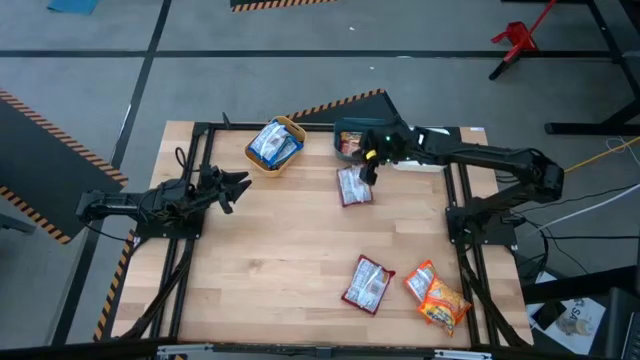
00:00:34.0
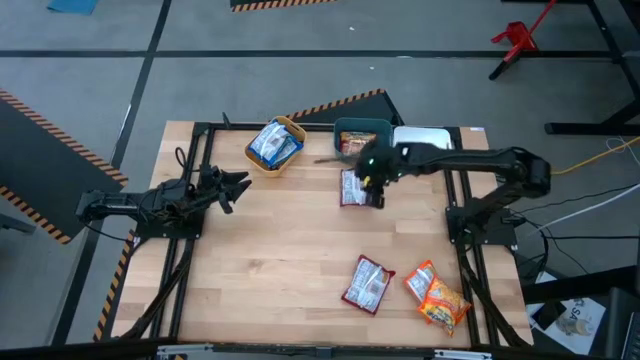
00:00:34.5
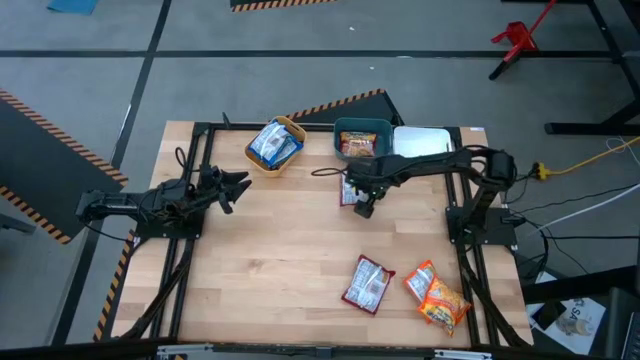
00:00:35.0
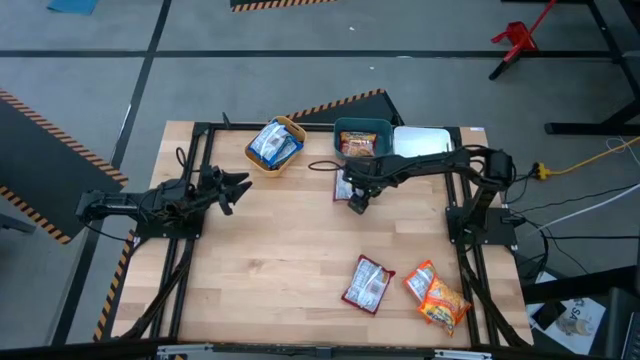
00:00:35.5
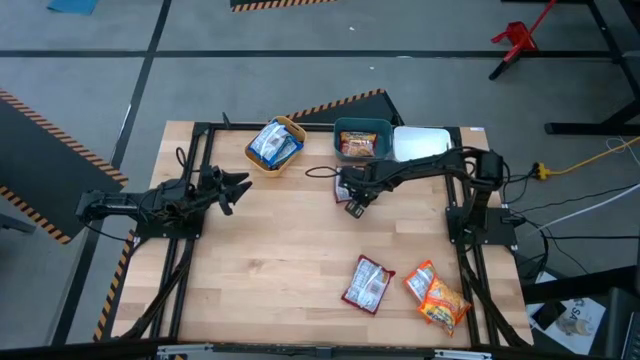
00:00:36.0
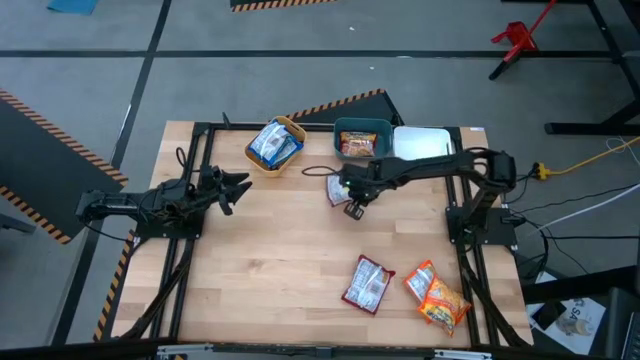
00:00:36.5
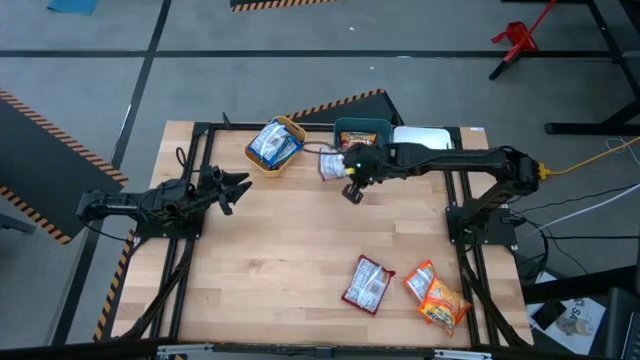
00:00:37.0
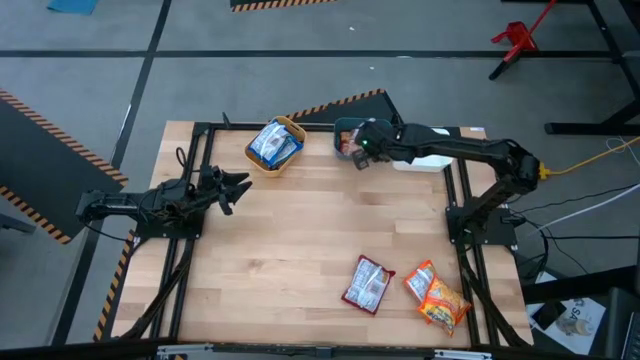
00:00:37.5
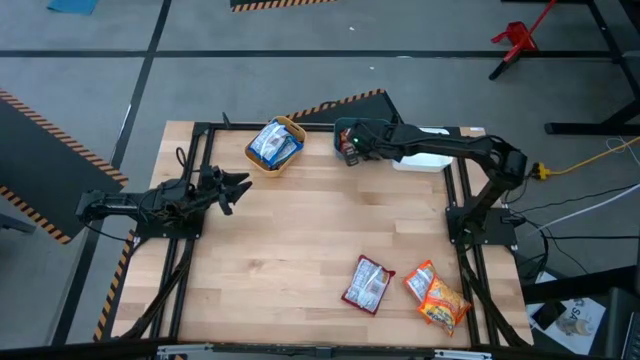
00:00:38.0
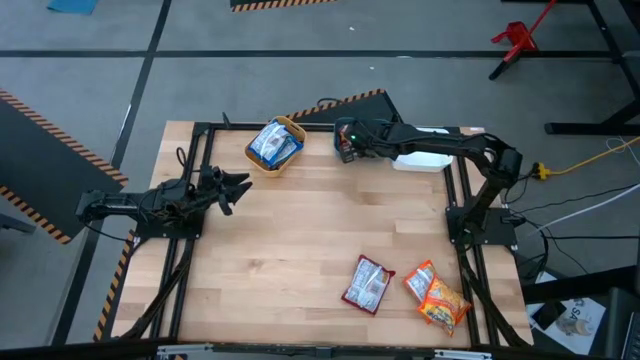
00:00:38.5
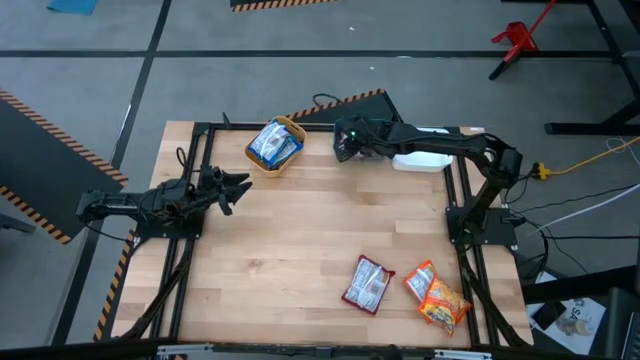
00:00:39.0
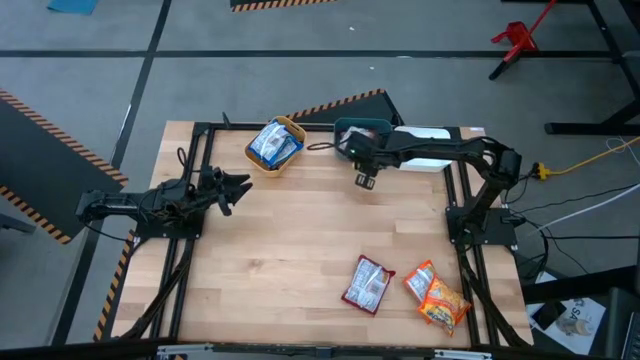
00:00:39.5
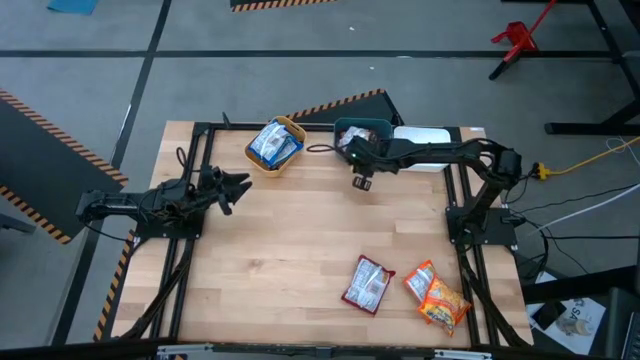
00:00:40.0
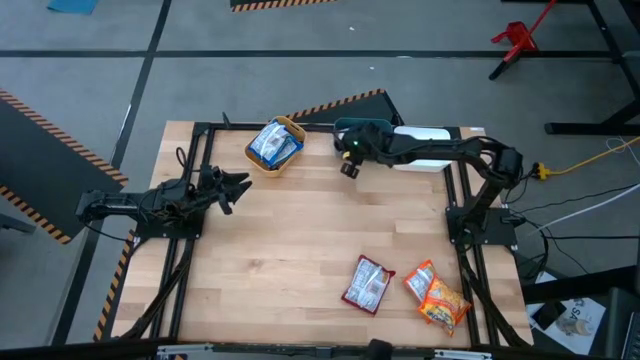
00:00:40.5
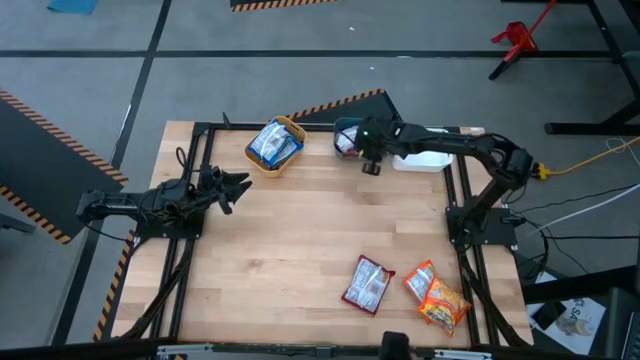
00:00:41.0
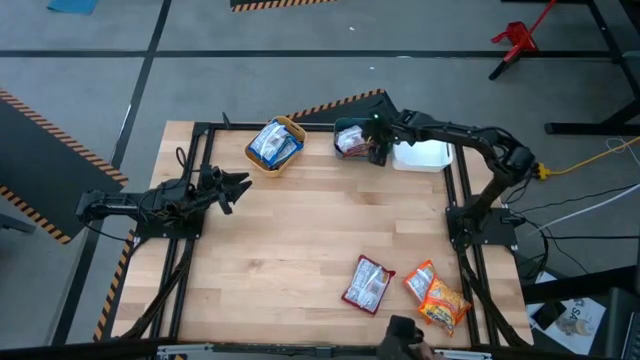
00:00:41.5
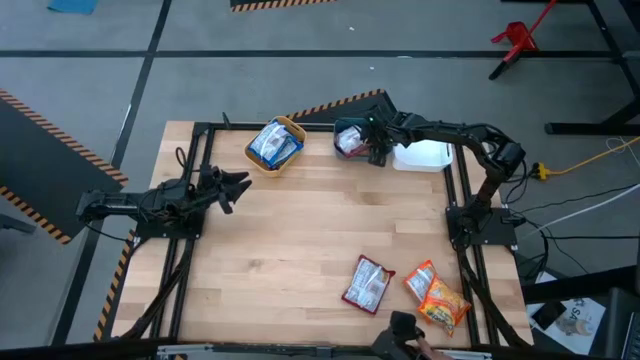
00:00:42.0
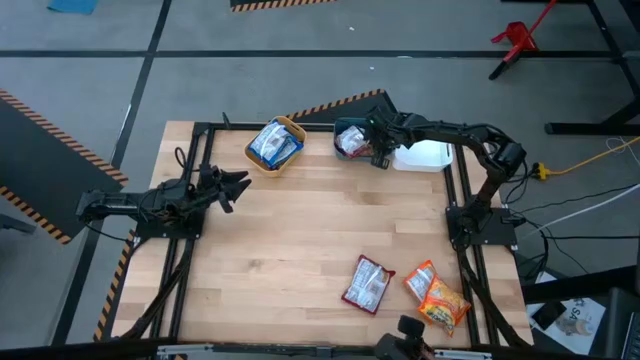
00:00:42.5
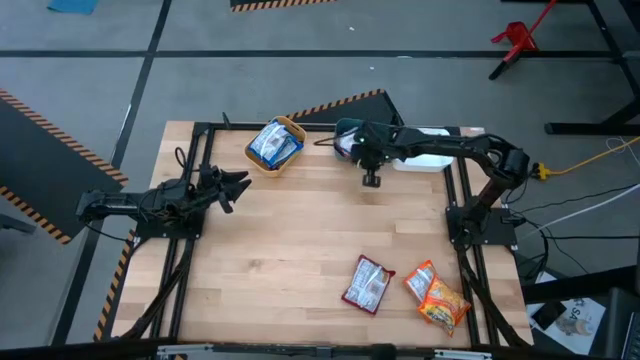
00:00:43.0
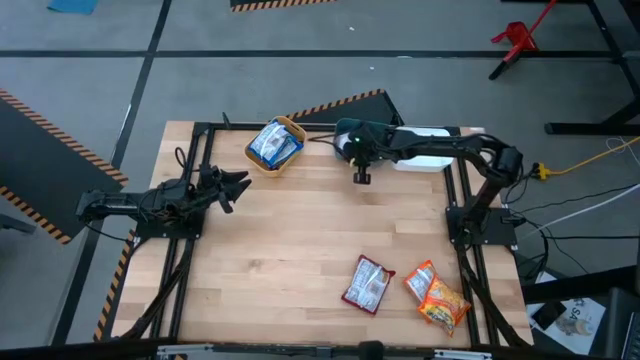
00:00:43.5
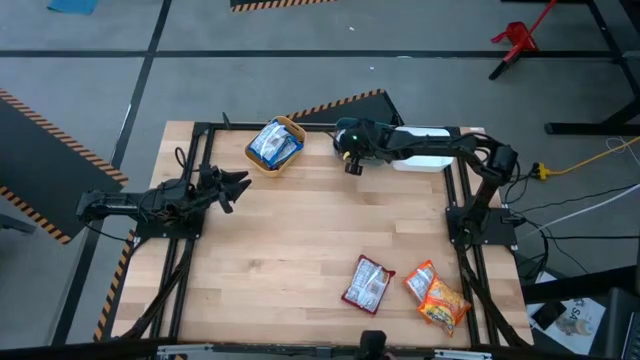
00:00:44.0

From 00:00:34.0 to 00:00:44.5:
Task: Sort Maruchan noodles
Put the top red noodle pack into the blue bin

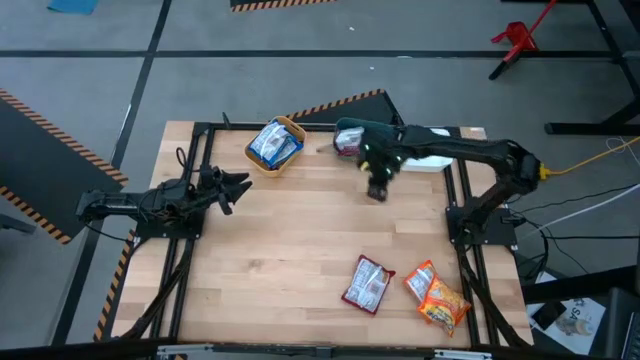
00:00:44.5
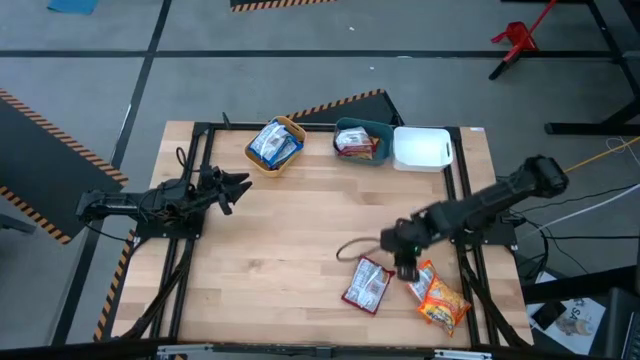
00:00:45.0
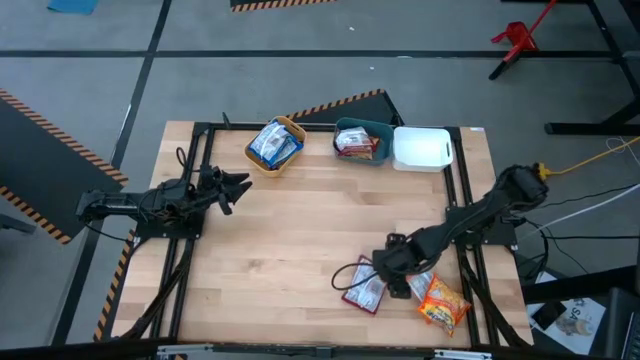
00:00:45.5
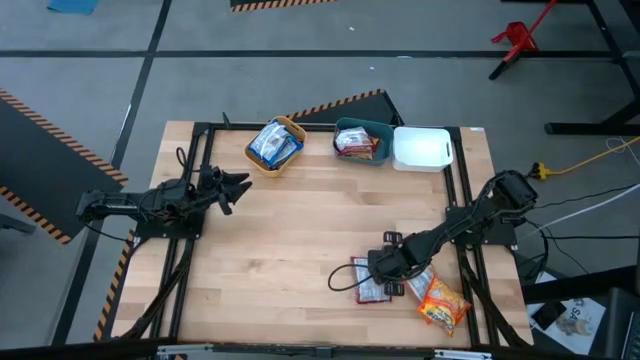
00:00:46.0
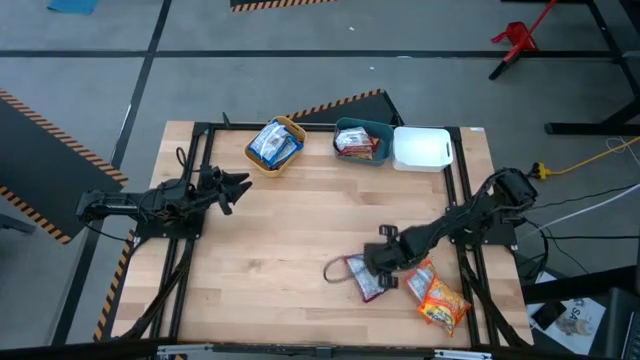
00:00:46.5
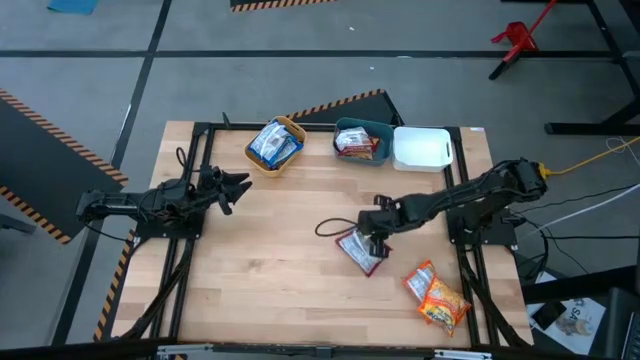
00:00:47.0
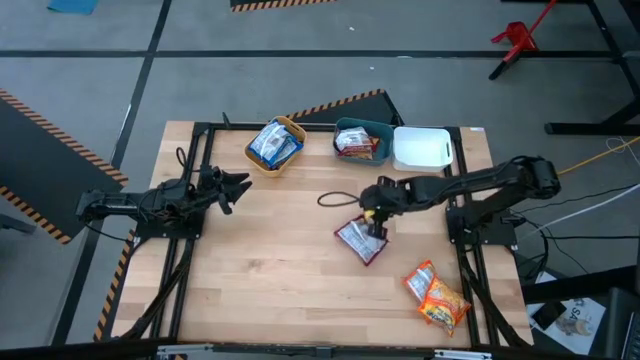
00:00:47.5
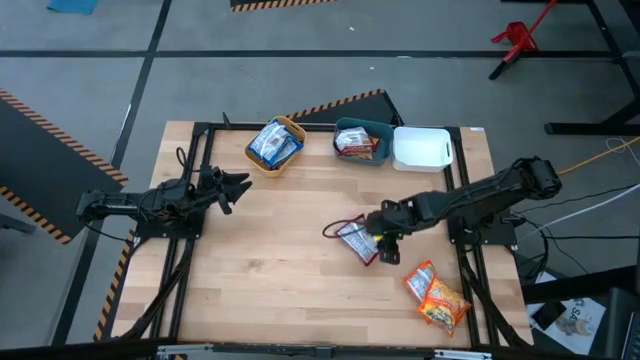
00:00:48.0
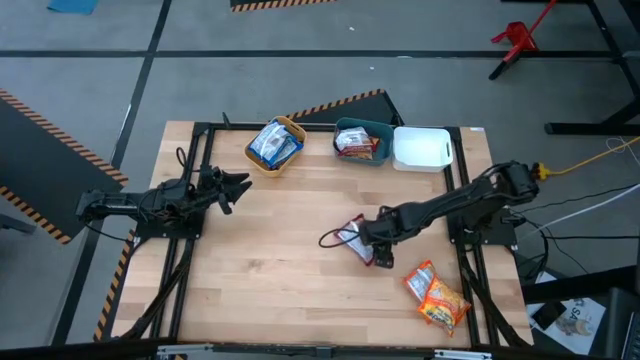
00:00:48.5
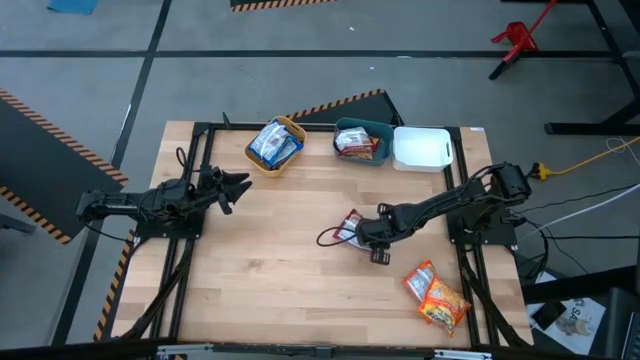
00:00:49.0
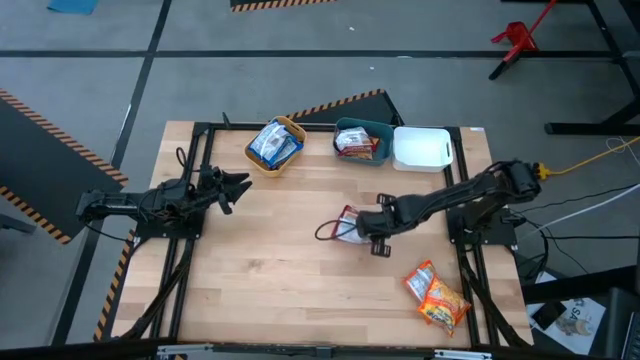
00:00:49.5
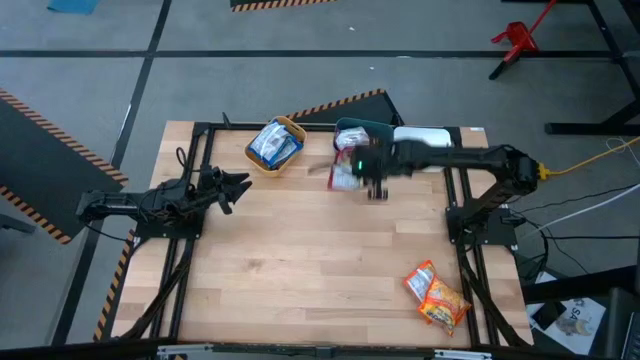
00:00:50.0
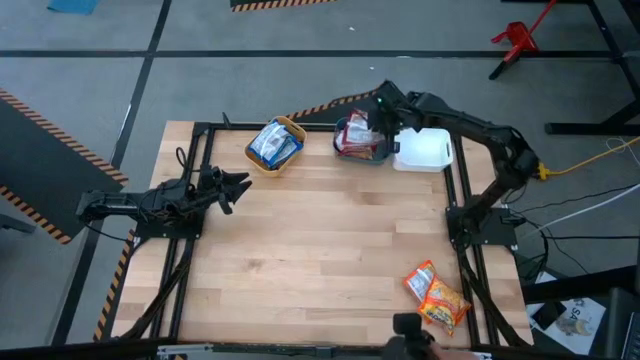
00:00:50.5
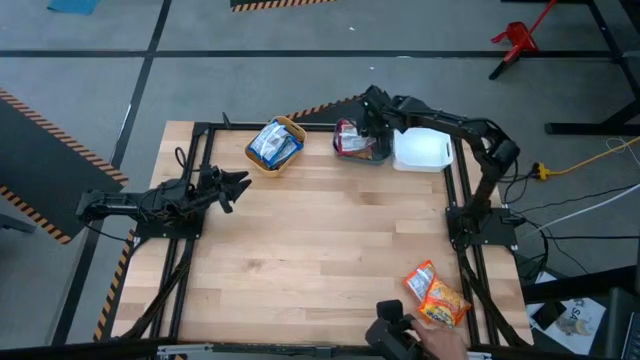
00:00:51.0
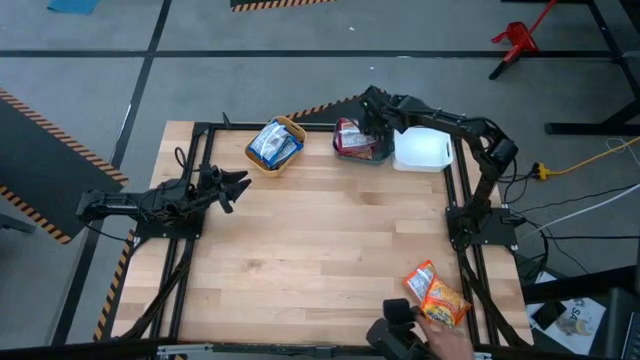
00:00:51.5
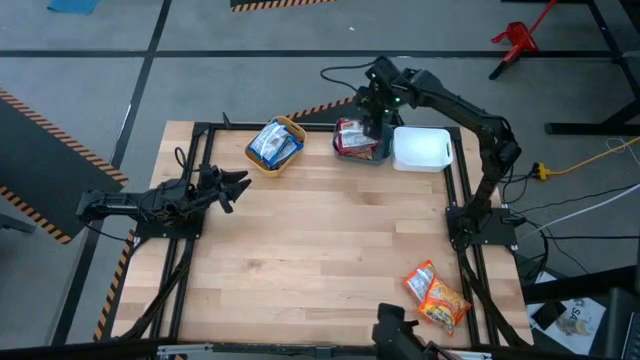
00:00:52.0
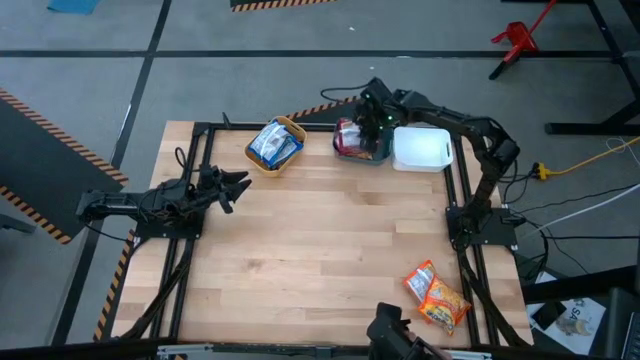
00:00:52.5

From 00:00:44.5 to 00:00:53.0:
Put the red noodle pack into the blue bin

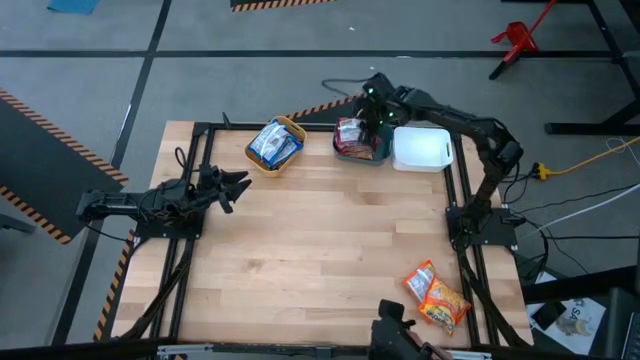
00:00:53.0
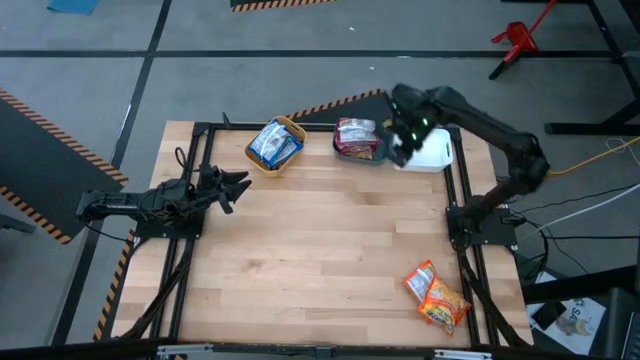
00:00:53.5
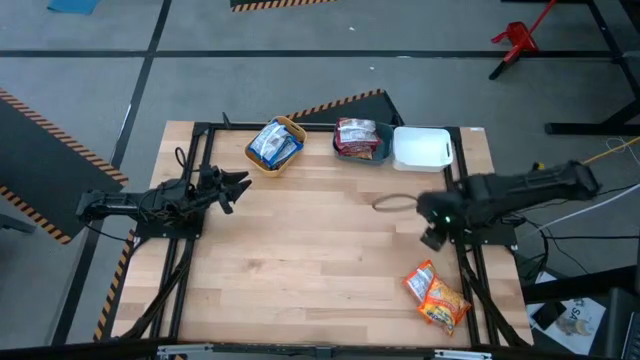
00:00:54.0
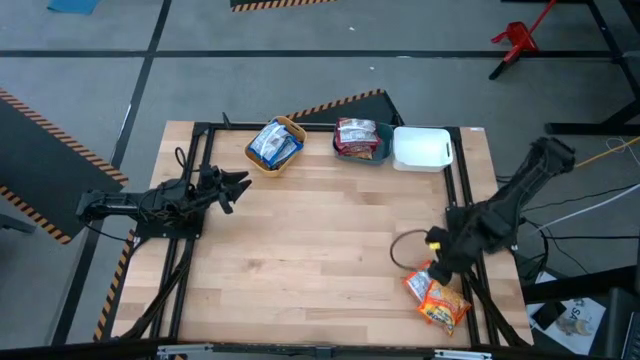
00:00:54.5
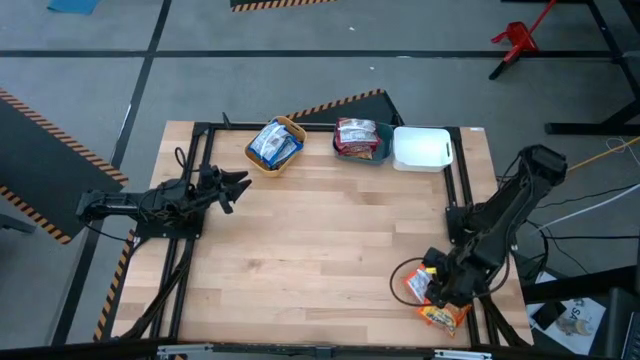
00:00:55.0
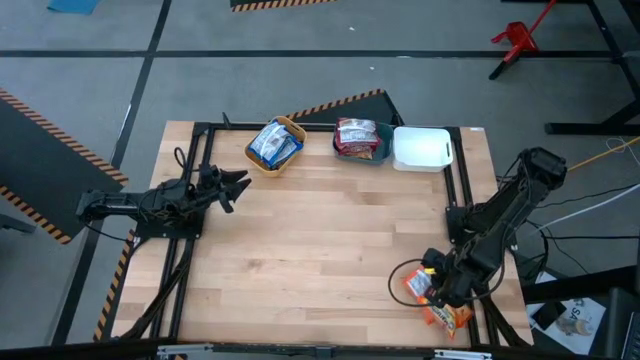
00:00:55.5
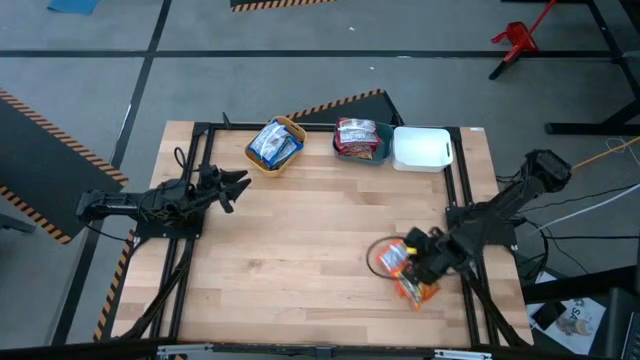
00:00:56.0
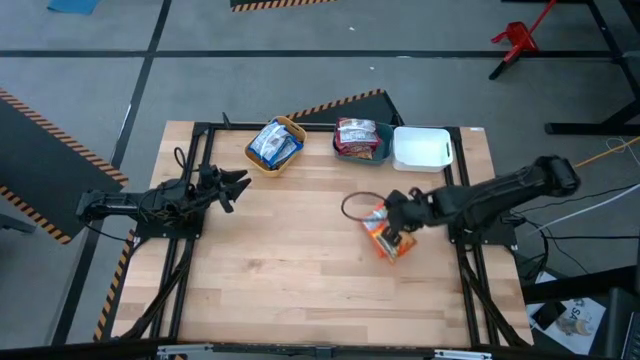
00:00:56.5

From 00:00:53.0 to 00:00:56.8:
Put the top orange noodle pack into the white bin
